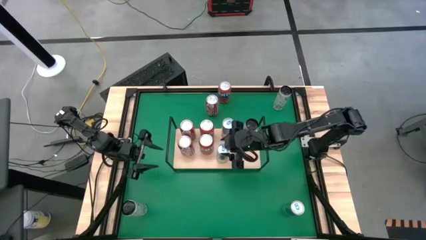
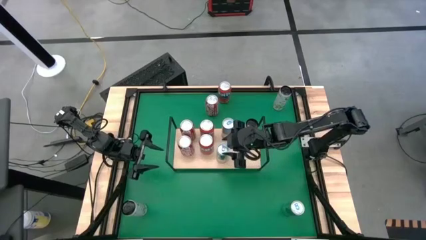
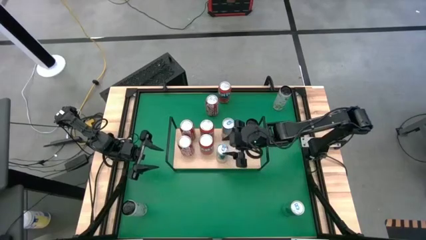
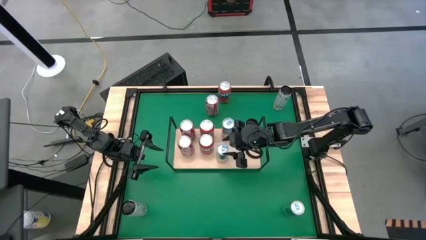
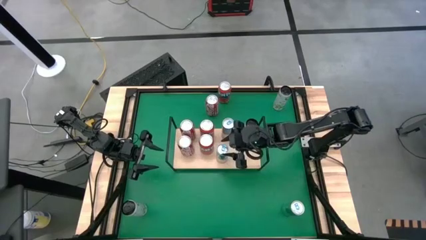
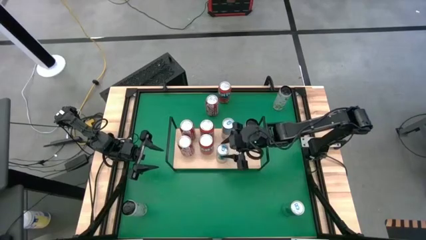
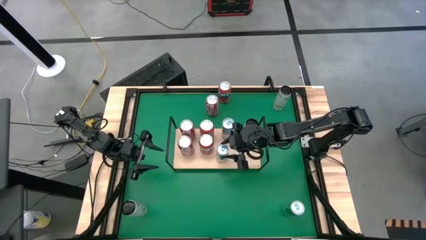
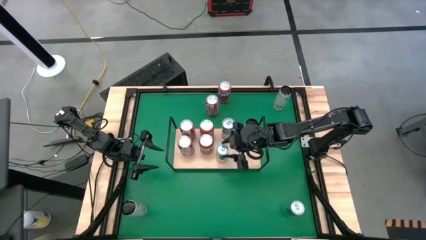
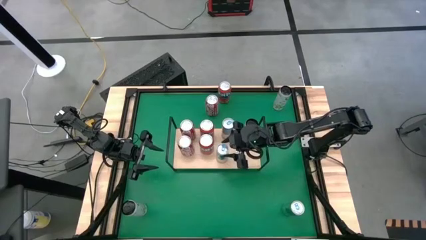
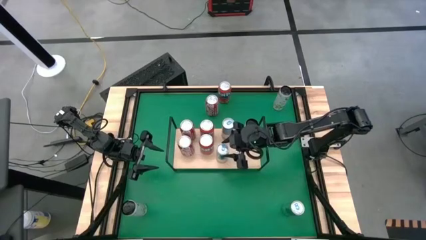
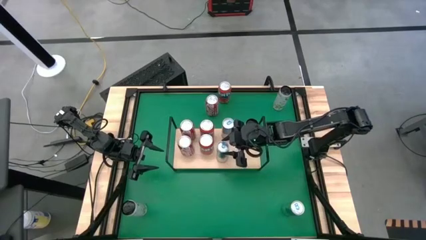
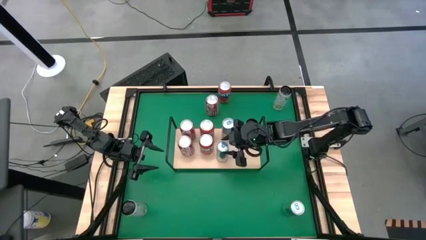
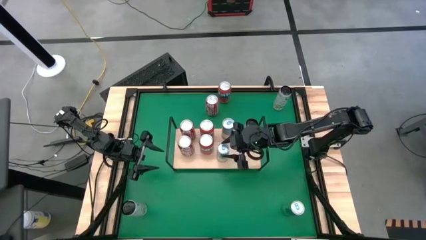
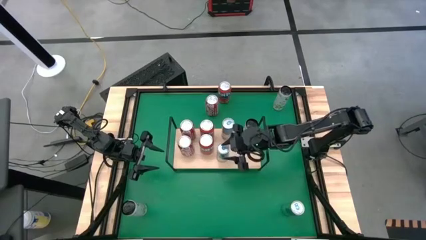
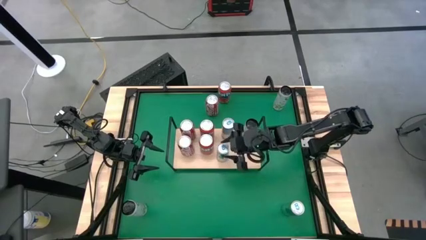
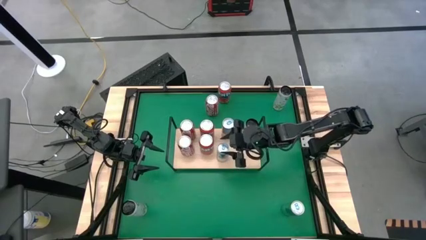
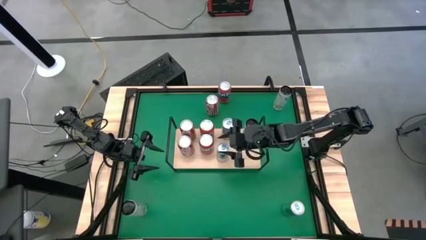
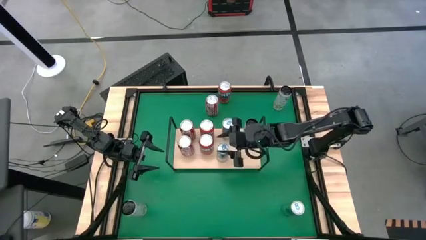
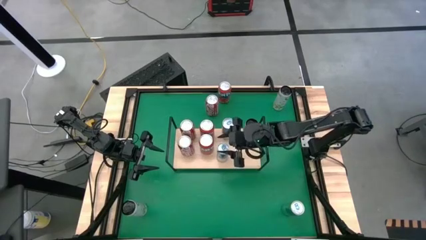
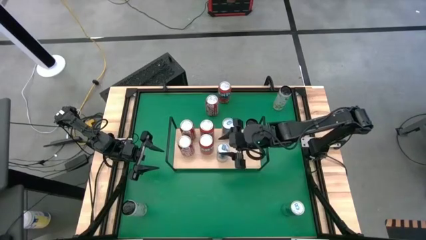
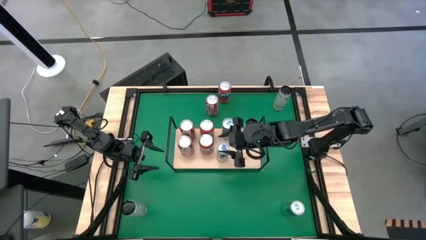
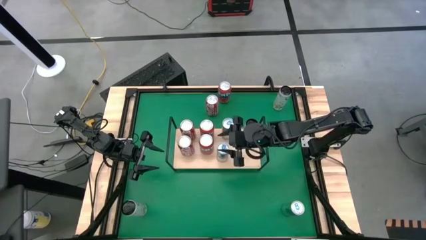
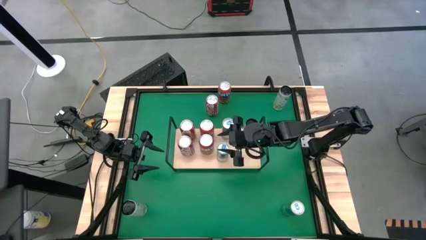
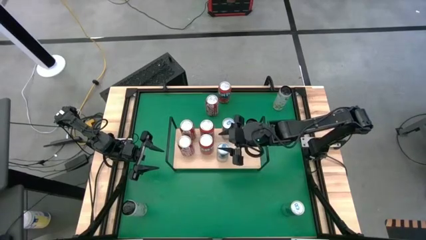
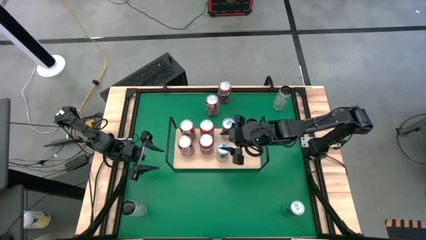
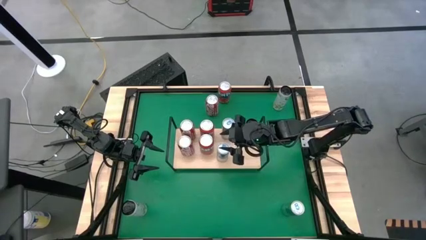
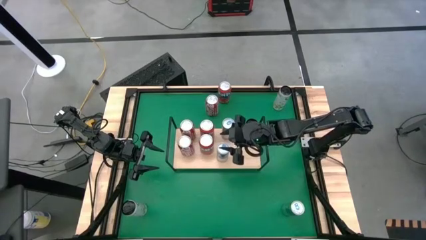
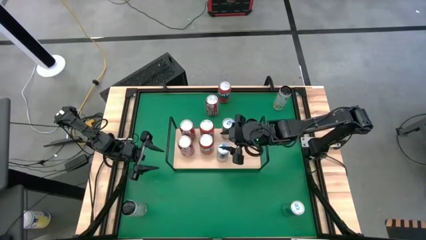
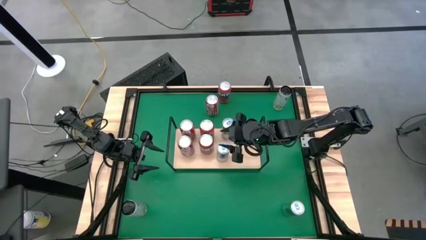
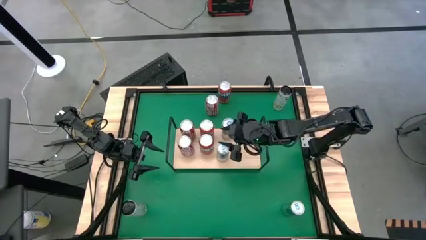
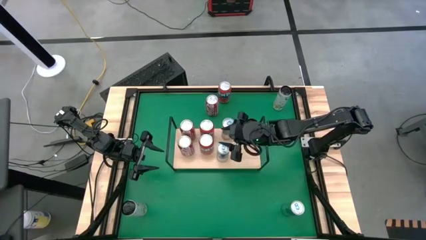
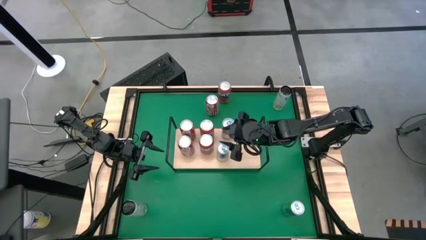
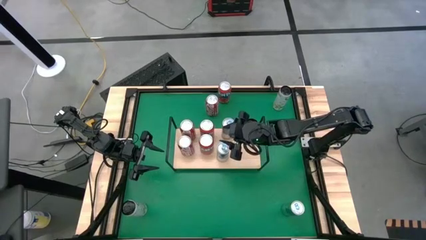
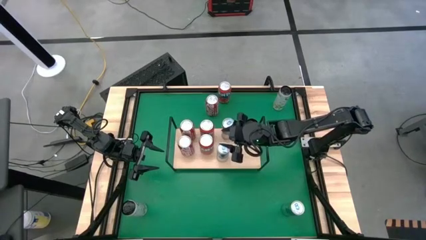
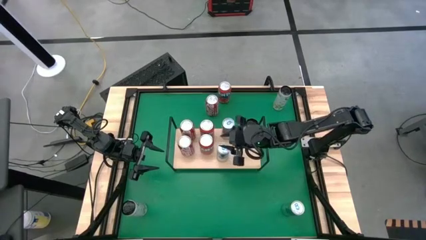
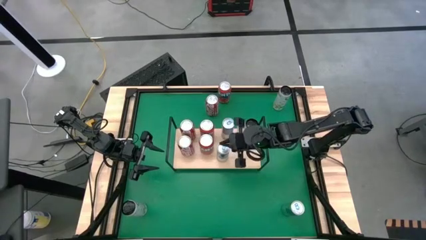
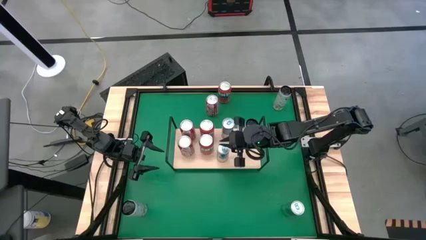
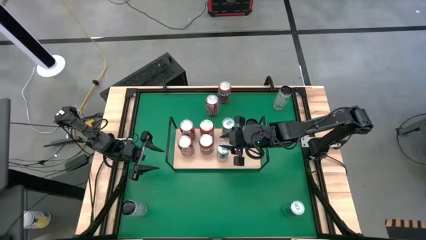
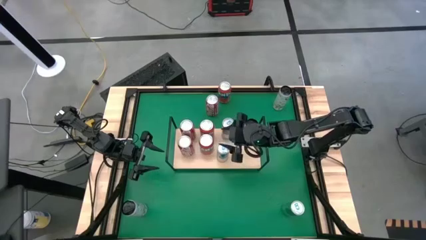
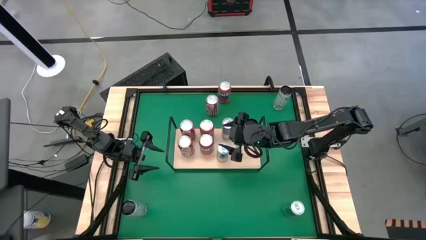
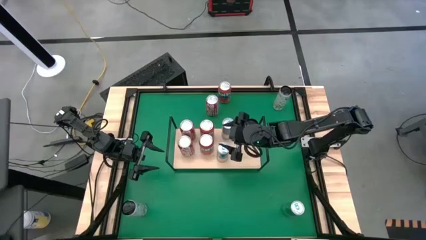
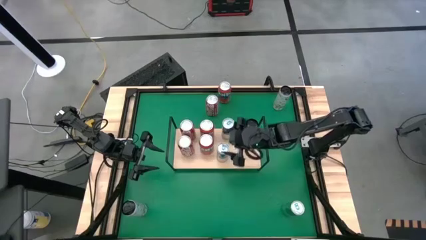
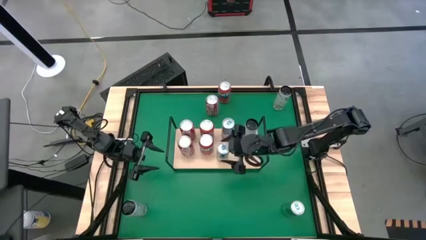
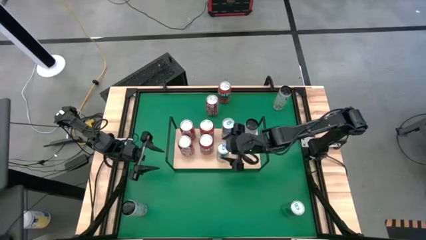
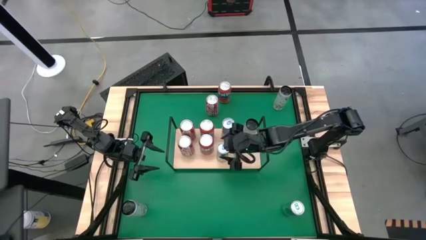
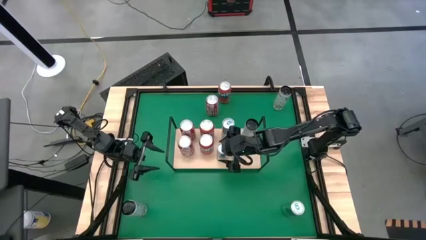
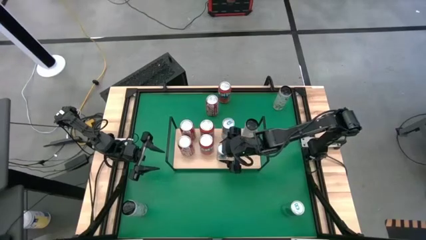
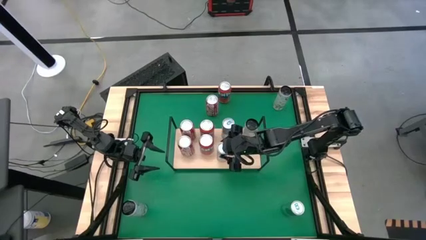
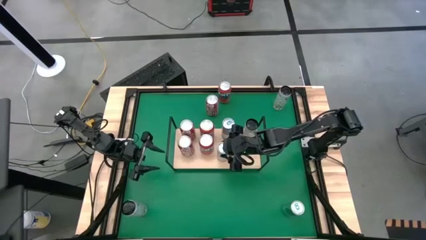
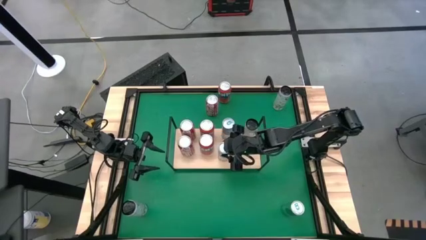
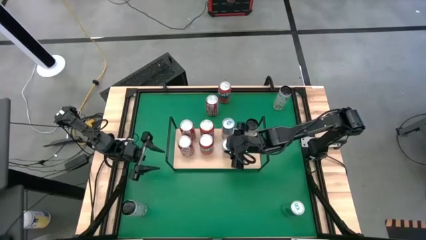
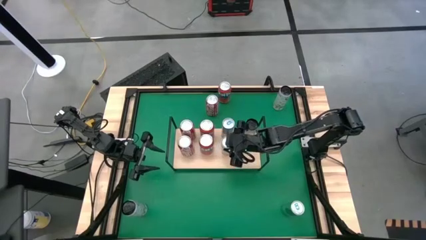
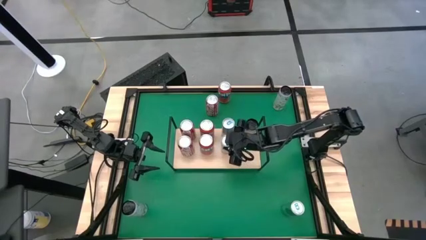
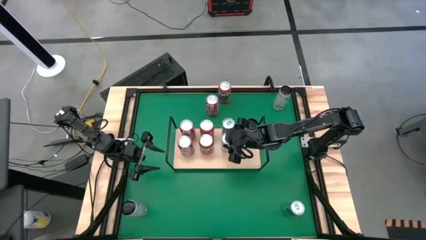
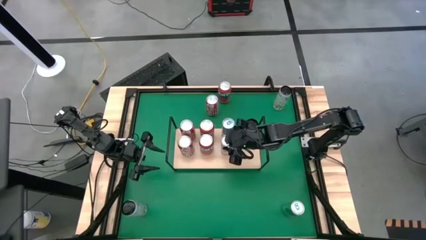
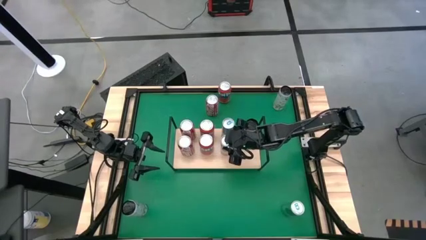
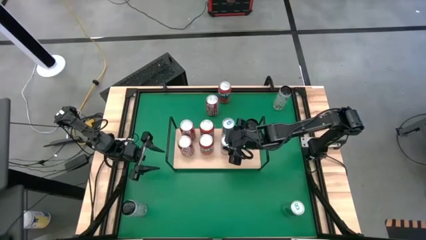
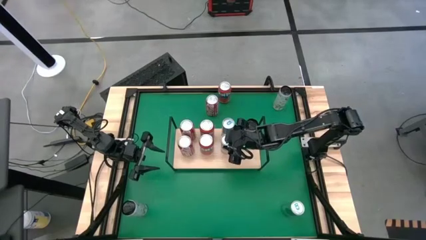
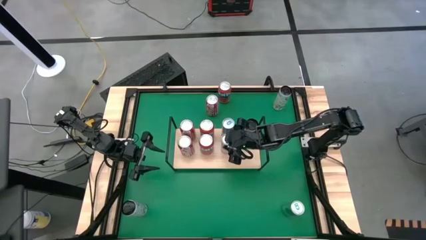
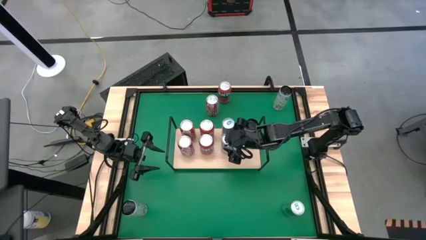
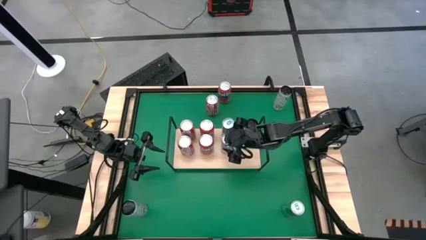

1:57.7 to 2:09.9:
Task: Place canned beverage on shelf
Put the left blue soda can on the shelf aligned with the other blue soda can
